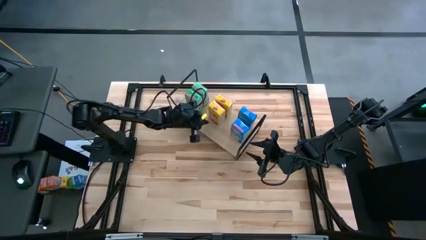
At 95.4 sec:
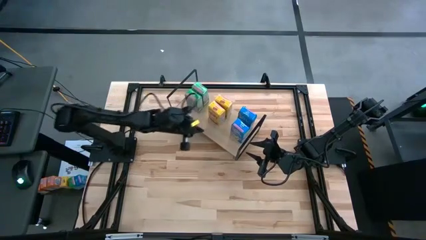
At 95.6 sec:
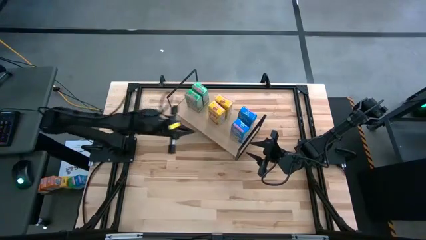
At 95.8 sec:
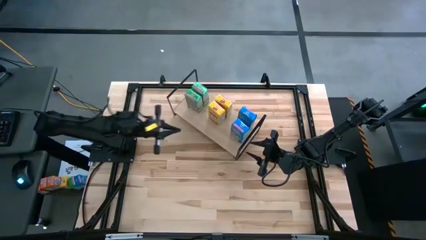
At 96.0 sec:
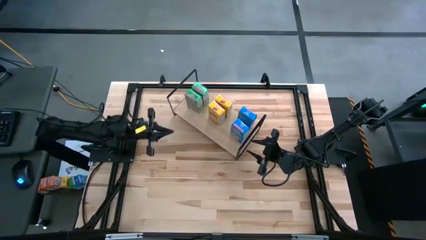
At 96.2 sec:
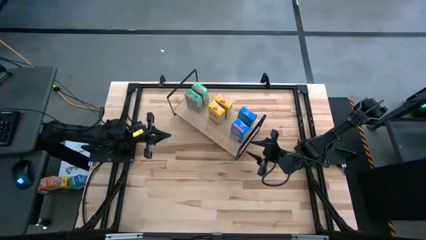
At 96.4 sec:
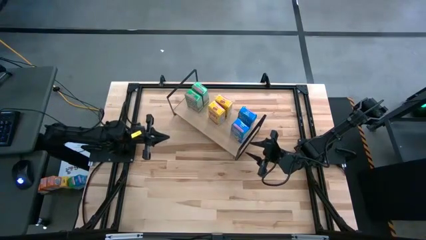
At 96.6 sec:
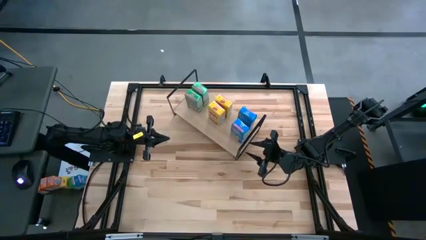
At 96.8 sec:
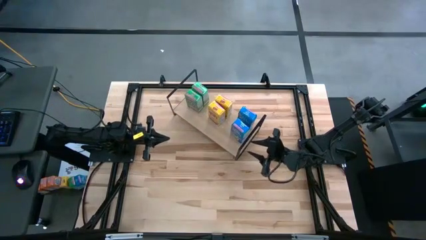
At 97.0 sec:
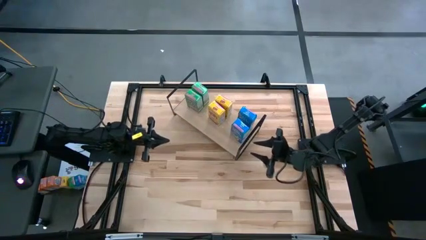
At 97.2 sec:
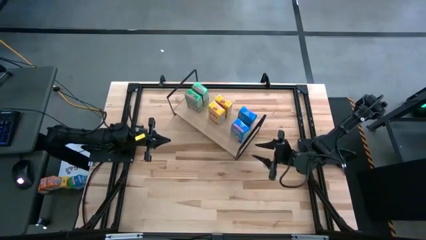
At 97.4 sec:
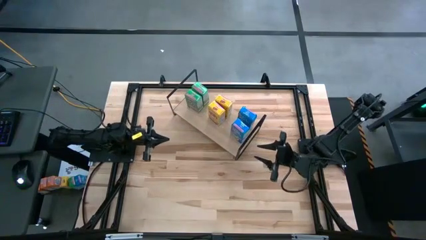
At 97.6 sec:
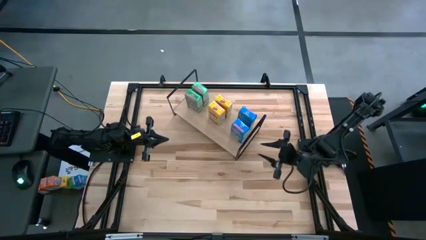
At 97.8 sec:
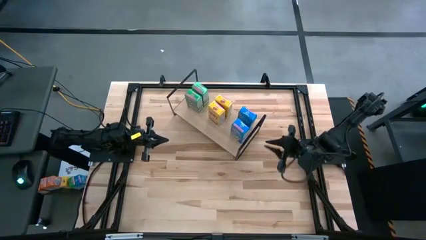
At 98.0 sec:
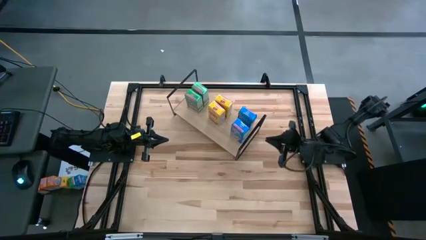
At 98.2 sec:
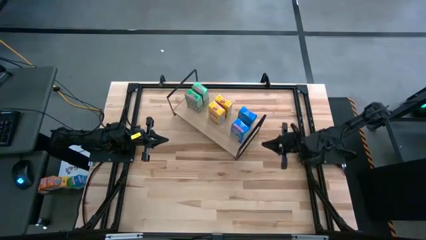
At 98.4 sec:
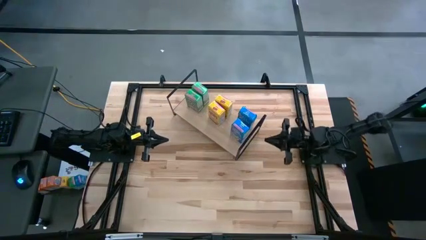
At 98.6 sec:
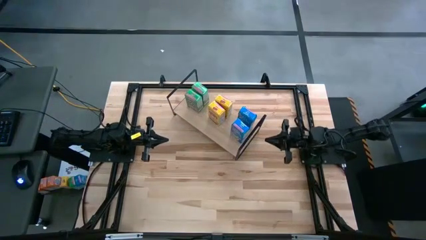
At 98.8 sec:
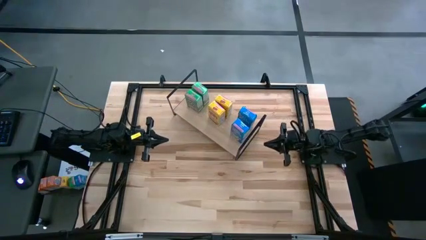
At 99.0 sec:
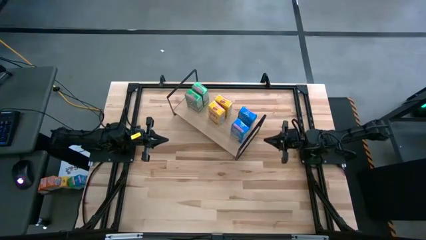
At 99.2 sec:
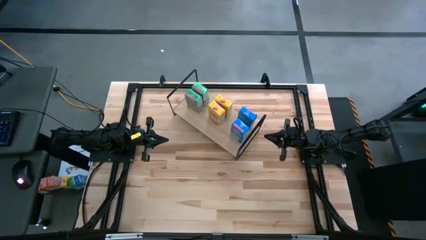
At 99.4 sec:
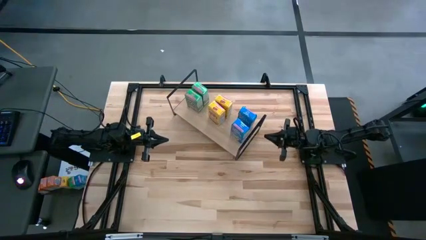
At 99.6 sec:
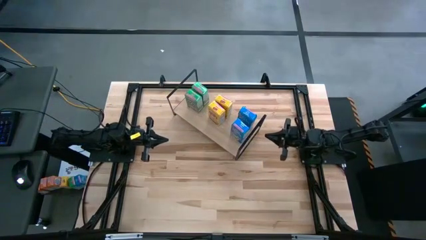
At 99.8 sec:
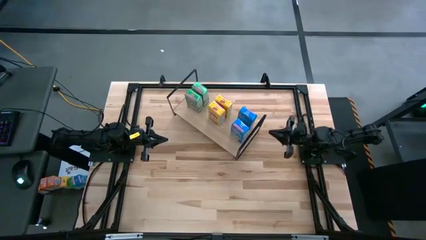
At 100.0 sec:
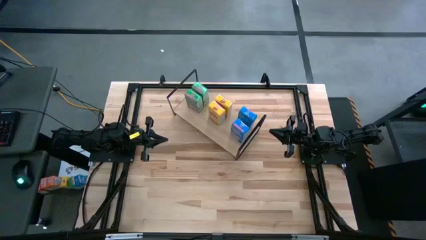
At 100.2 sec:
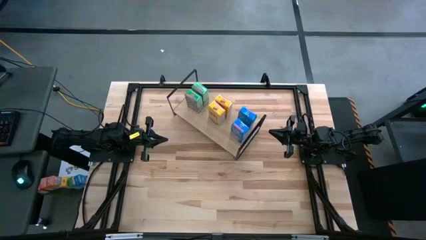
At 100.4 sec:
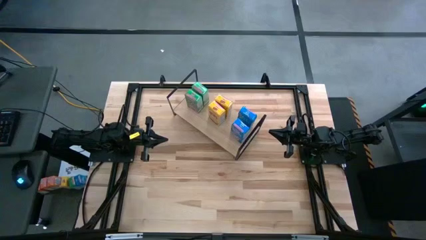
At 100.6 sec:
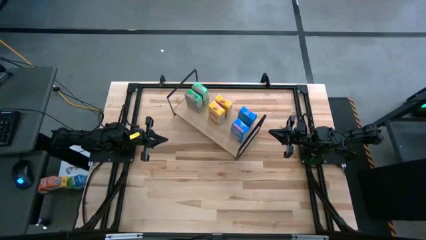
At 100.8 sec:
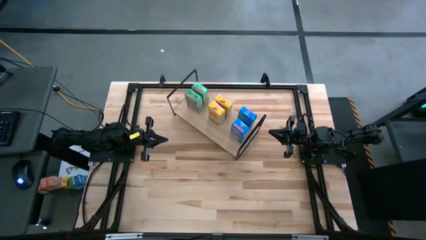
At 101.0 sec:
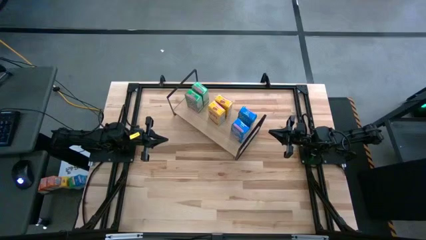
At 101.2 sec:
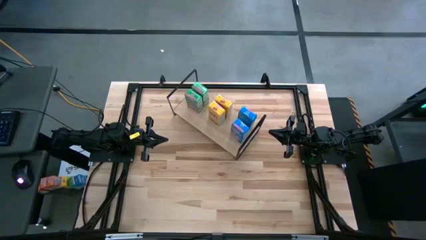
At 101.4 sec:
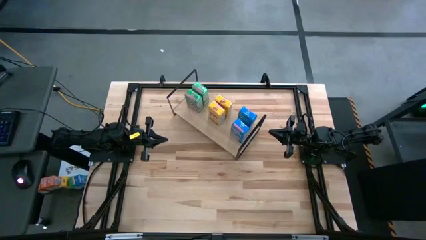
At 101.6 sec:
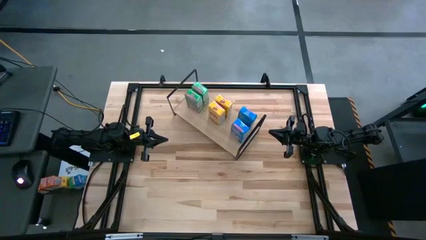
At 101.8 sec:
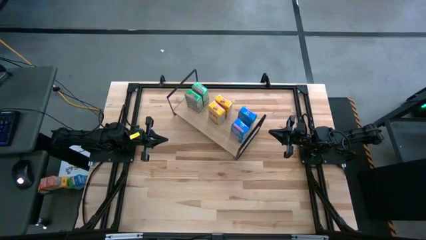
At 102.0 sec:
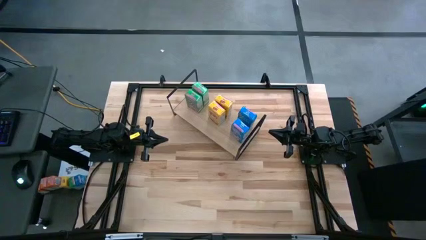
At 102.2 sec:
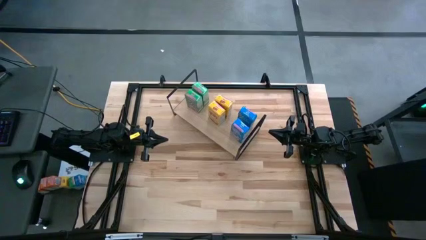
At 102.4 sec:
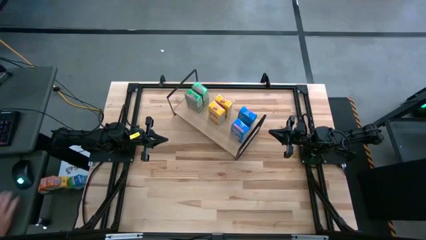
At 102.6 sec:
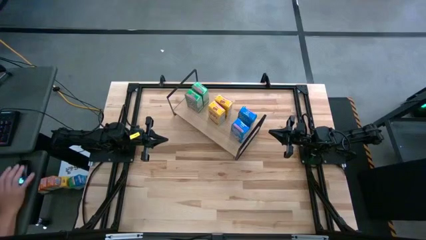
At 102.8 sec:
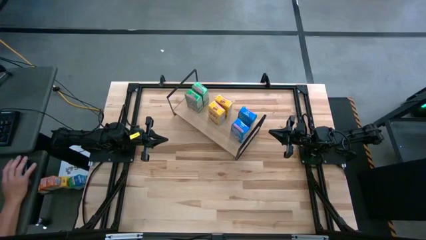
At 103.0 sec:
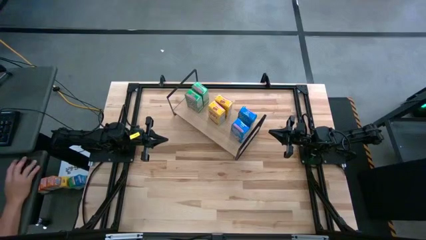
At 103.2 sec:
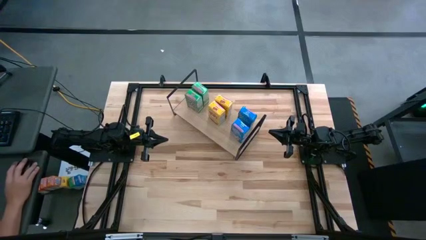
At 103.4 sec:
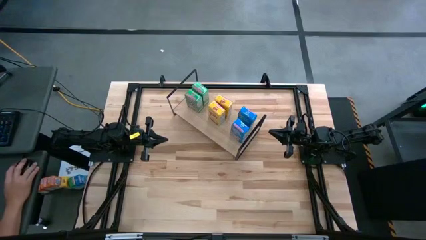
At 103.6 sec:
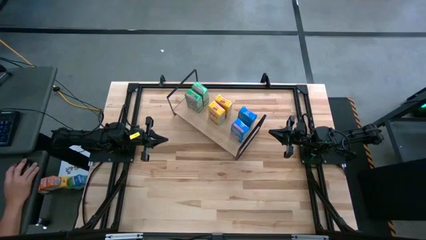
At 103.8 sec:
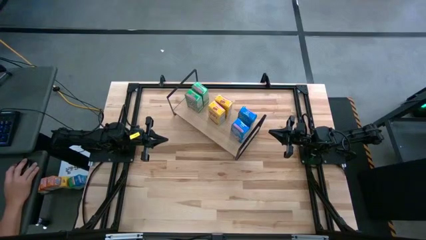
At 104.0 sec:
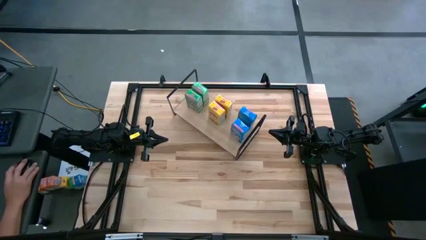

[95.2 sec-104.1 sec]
Task: Stack cereal on shelf
Return to Home Position

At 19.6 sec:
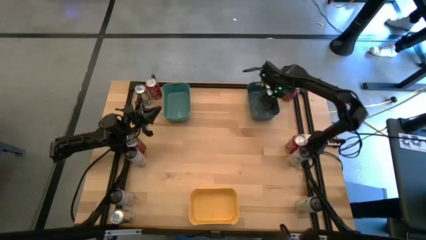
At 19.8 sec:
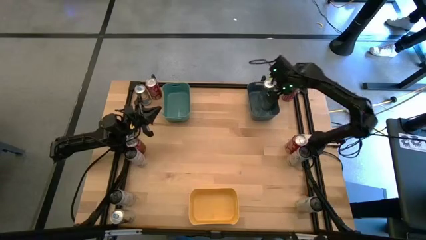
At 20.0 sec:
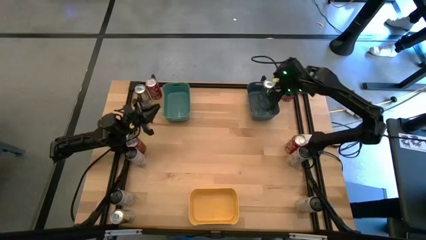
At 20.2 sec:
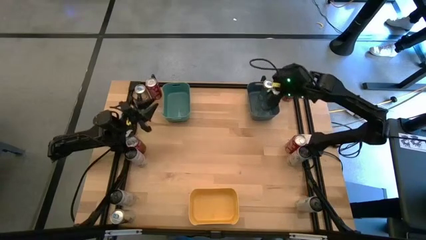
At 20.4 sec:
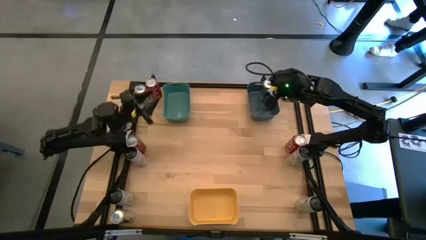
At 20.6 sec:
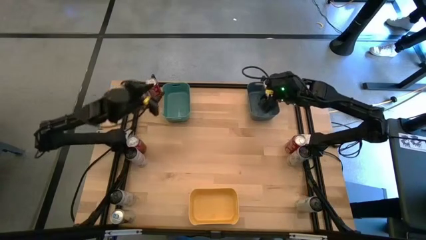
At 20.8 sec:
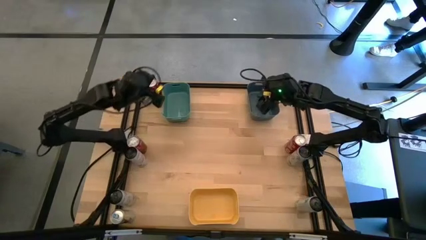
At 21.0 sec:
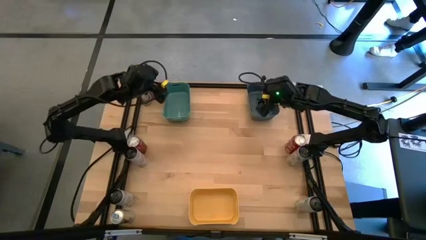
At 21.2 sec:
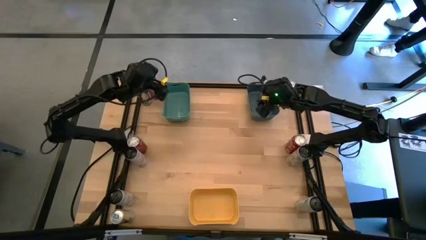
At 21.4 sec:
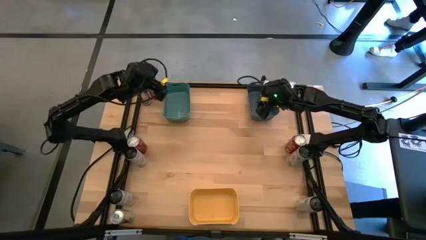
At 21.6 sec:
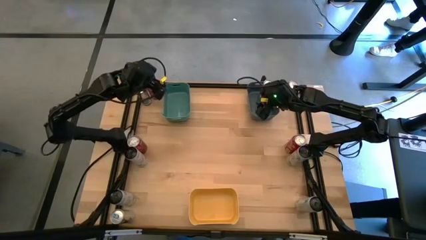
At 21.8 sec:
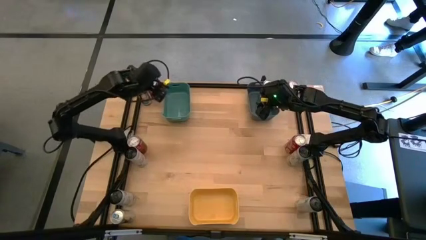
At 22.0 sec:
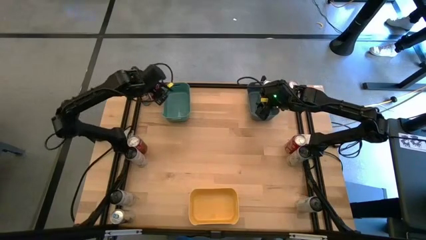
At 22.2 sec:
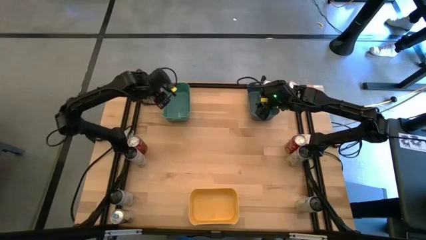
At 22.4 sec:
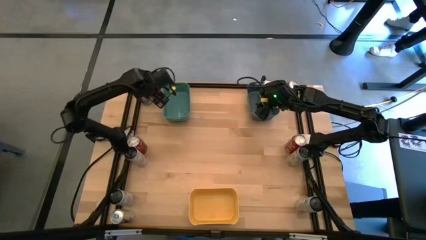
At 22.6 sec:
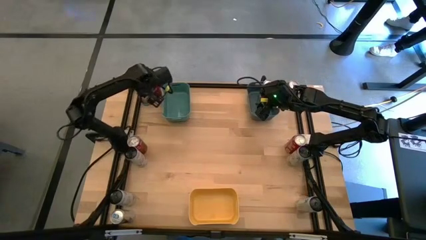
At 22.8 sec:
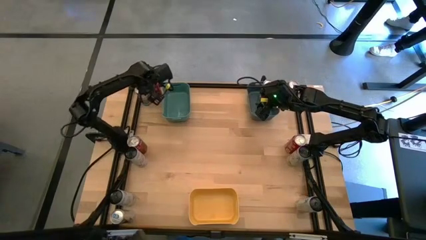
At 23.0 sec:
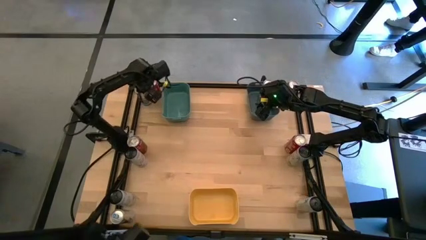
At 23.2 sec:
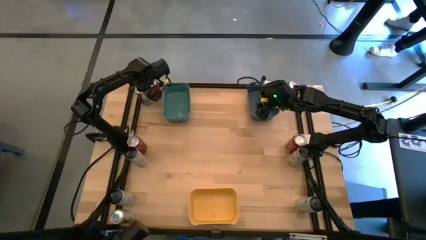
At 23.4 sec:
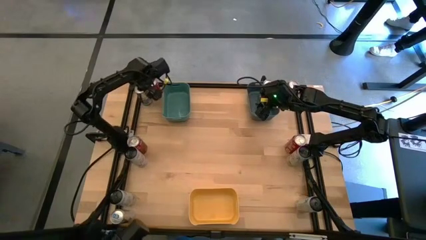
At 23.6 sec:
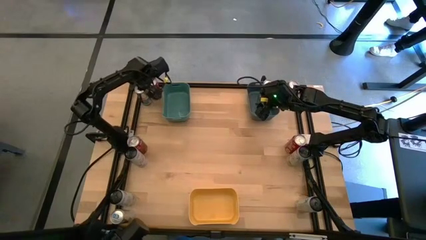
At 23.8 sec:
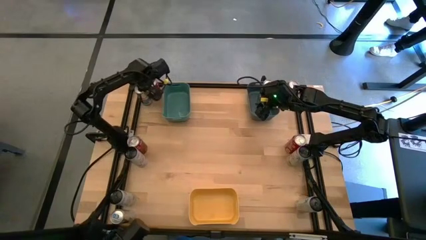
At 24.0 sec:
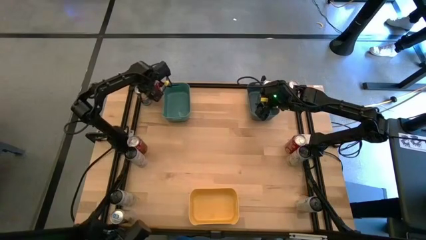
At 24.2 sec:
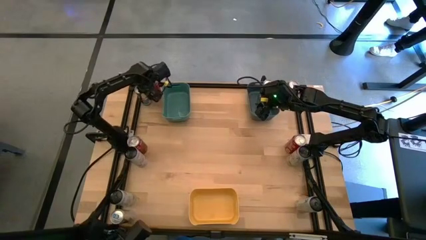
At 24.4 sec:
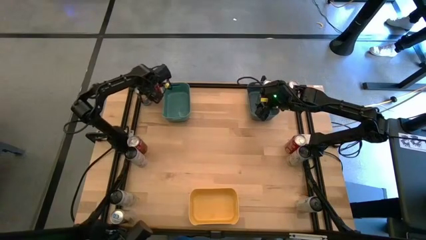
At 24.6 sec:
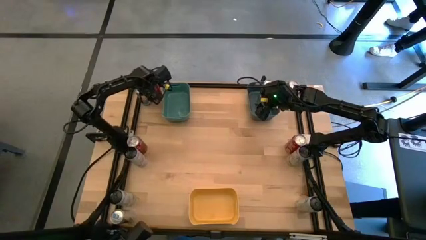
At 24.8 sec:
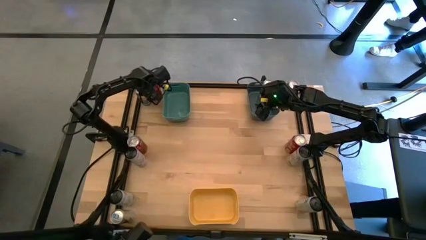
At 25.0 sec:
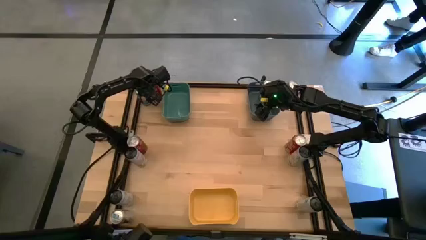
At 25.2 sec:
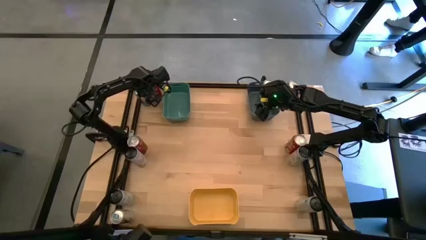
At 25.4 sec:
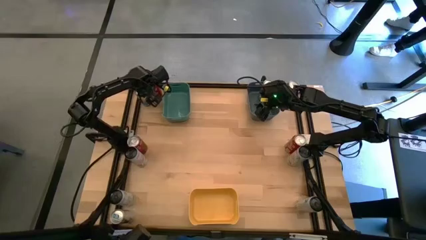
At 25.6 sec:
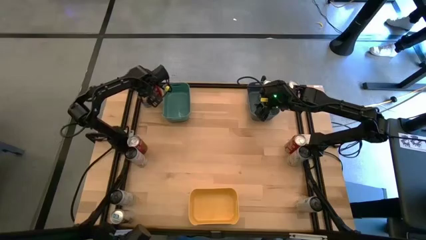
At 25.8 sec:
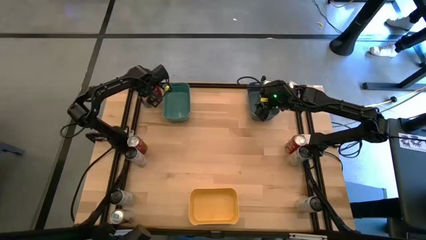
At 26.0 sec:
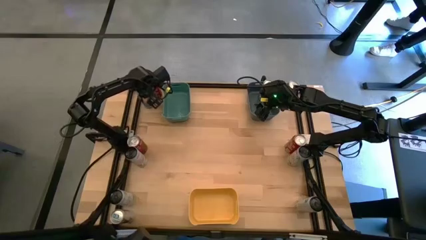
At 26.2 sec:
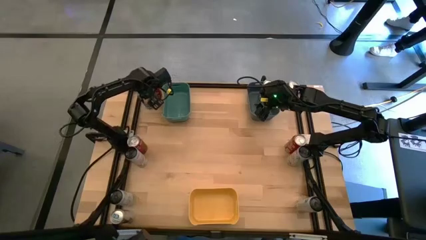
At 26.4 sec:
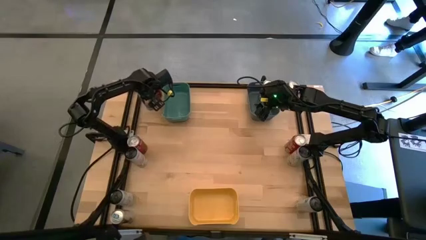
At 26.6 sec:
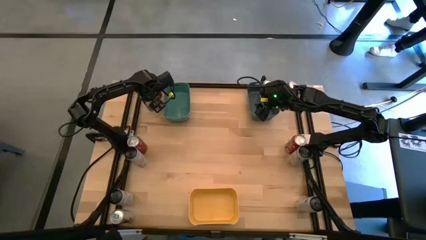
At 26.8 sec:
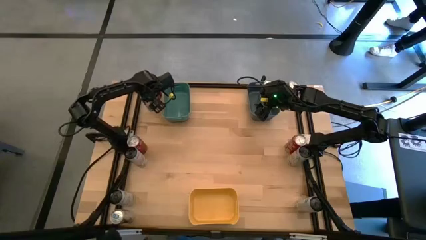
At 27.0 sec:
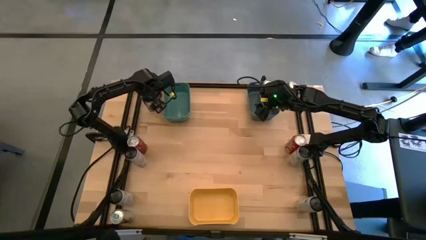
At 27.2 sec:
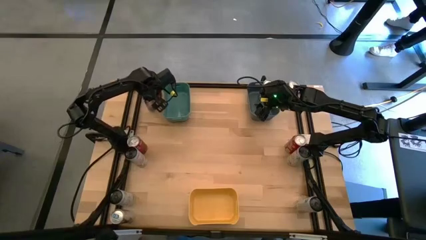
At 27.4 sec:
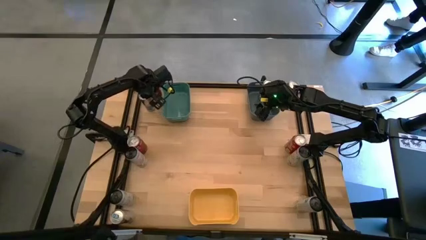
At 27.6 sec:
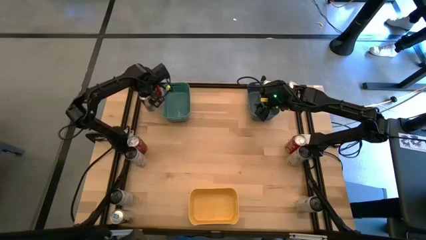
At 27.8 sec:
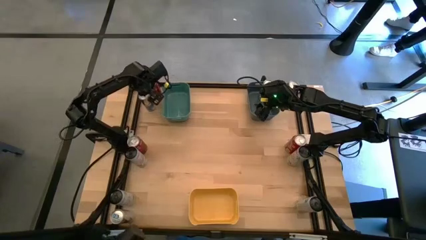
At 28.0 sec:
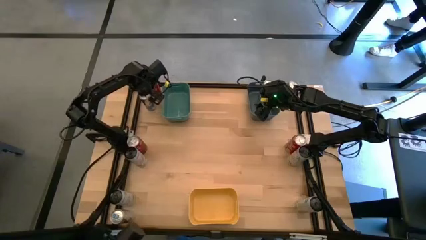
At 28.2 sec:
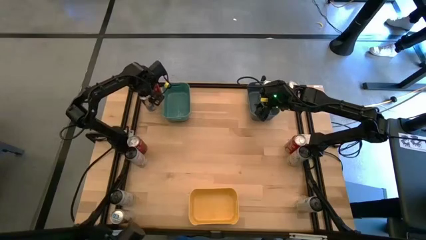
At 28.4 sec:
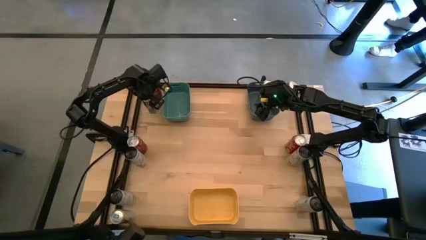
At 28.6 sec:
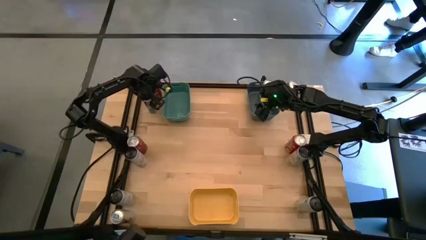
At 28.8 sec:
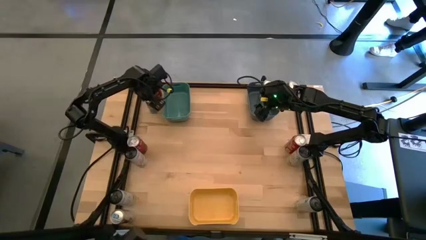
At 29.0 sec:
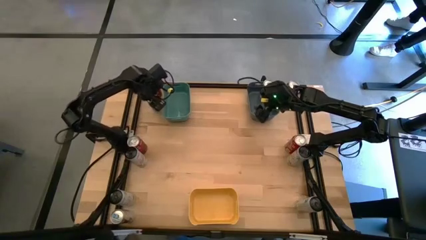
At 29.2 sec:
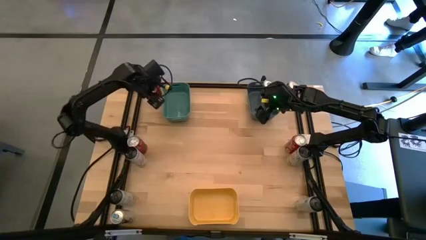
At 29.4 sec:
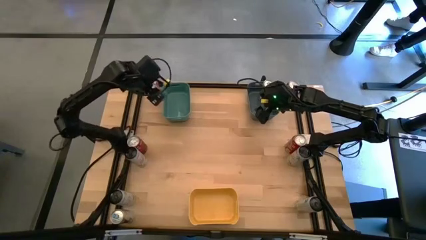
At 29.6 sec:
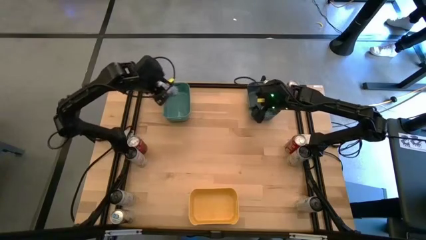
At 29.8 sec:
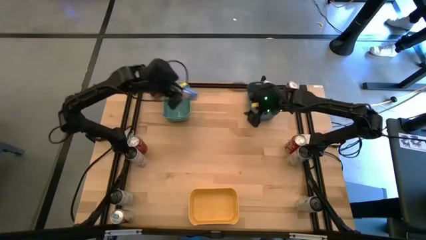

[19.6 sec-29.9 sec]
Task: Sort soda cans
Put the top blue soda can into the blue bin
